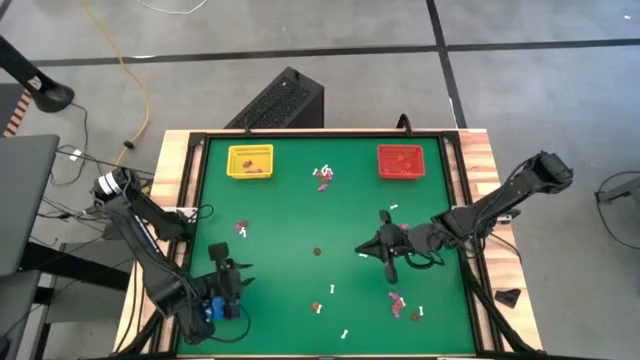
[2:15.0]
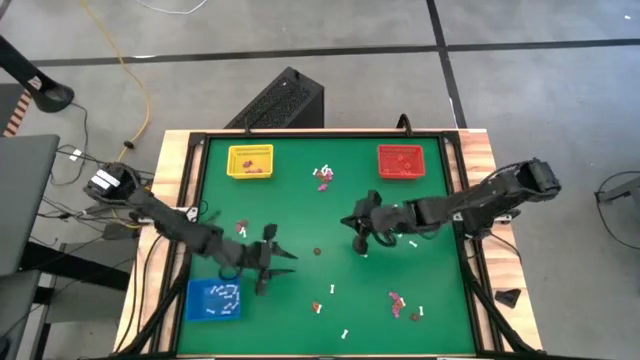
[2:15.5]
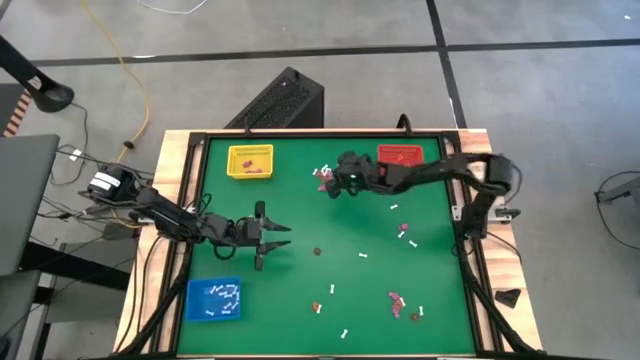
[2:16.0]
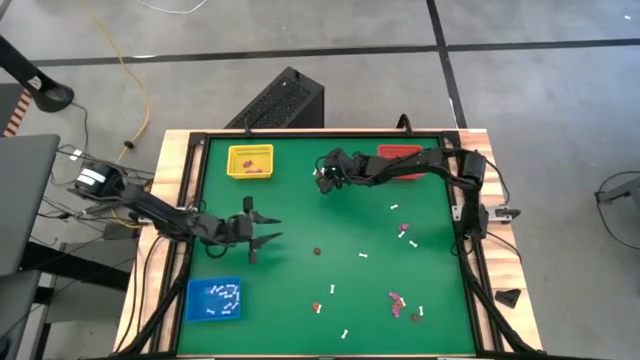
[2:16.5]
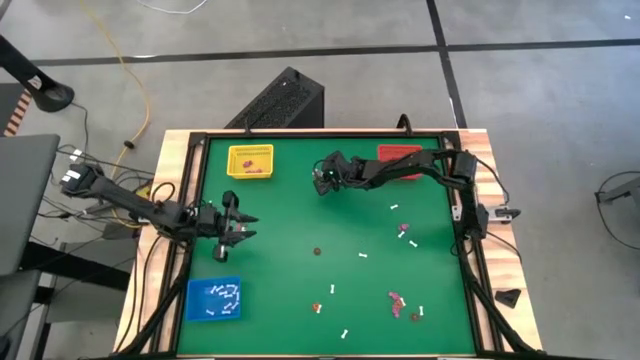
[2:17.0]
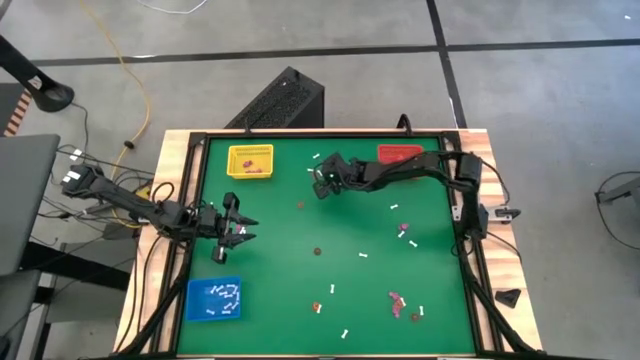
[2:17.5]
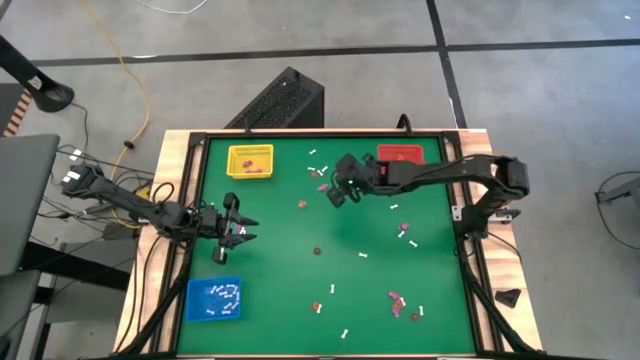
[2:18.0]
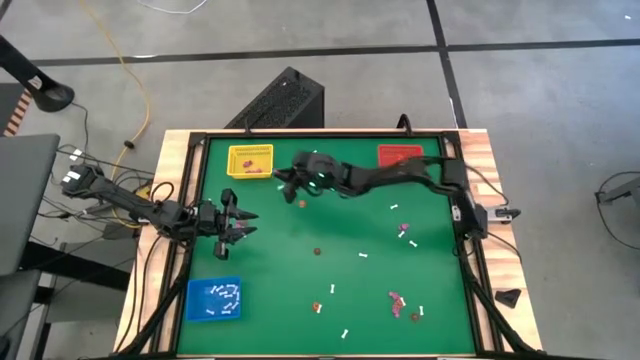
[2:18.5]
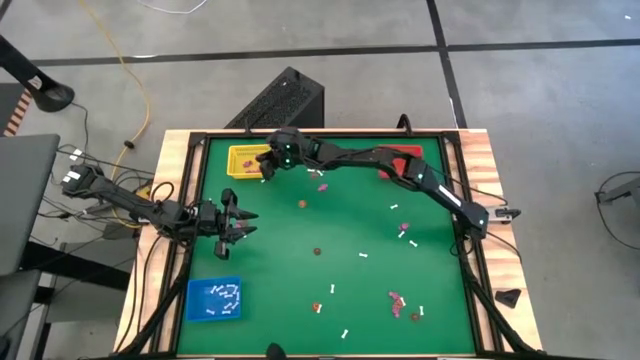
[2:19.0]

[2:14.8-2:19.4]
Task: Sort Halloween decoration
Put the pink skeleton toy into the yellow bin

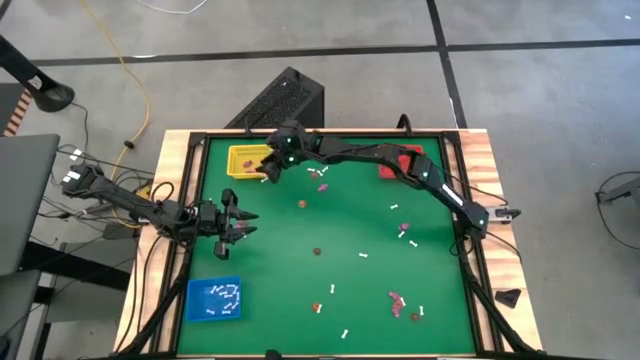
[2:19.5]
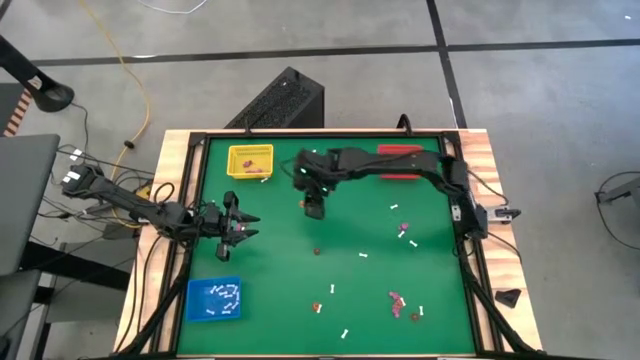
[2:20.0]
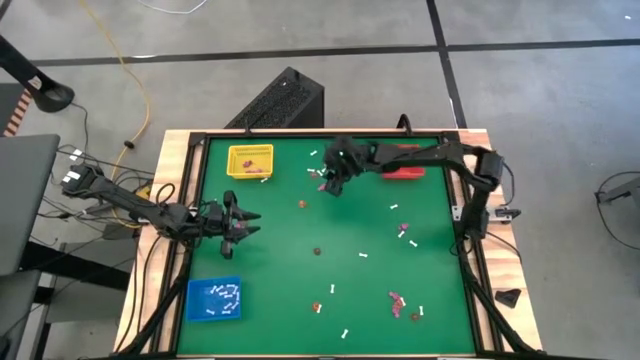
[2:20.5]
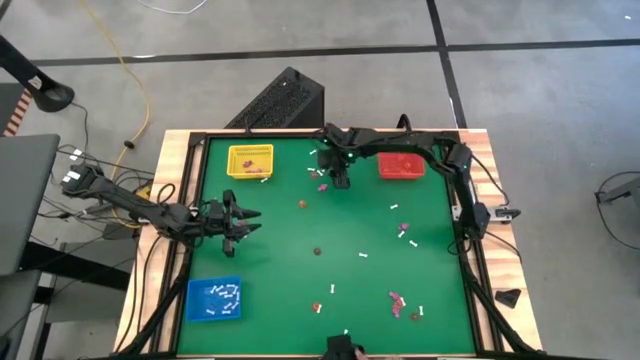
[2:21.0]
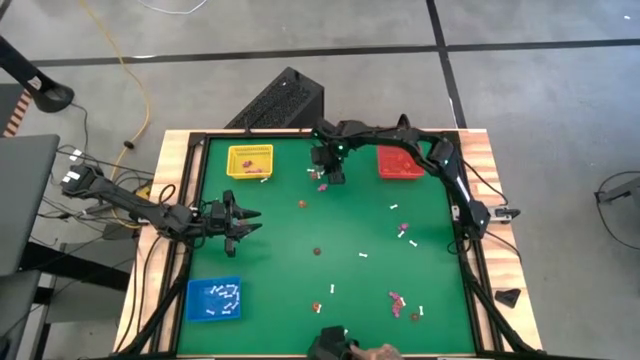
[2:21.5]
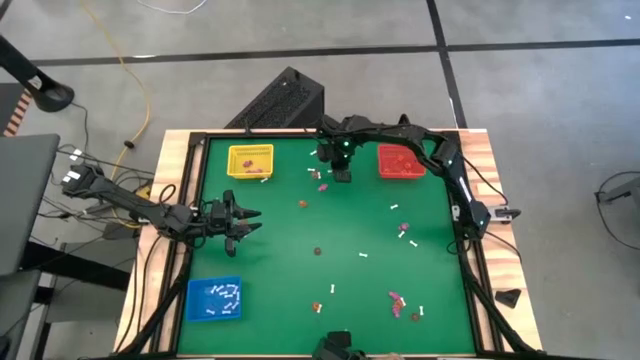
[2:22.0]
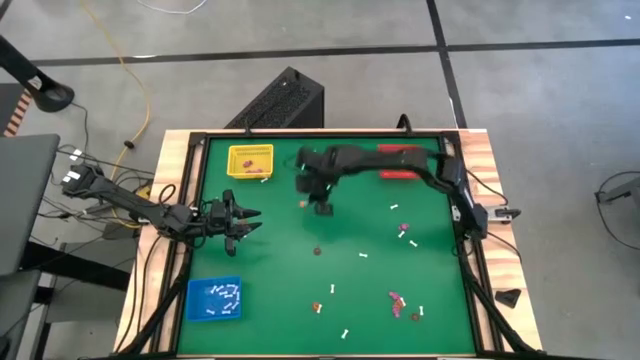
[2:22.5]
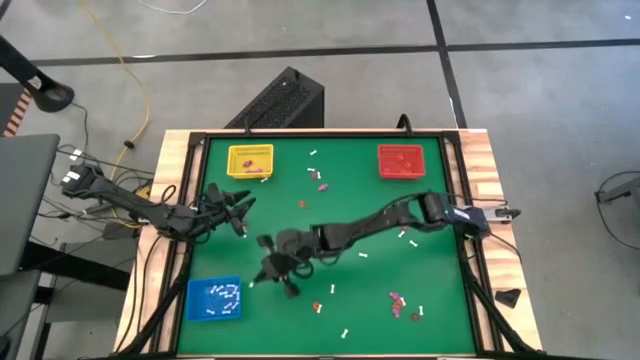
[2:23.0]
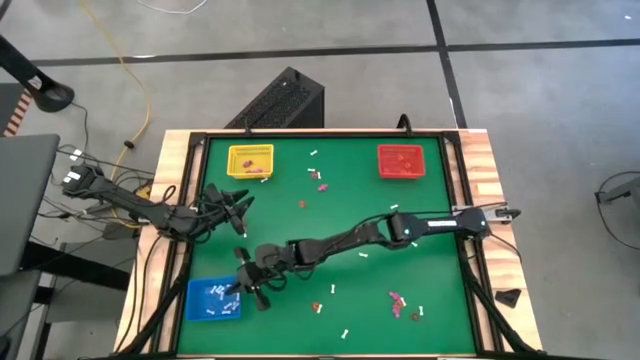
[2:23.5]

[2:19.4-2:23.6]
Put the white bone toy into the blue bin

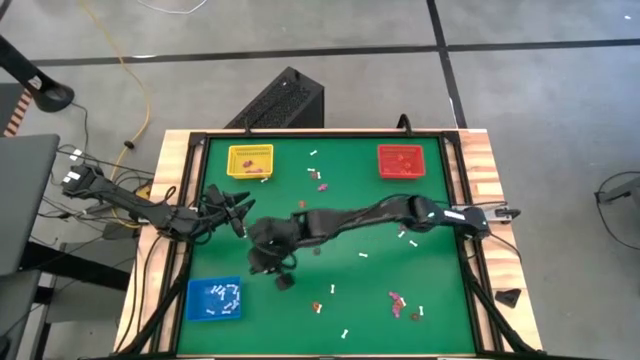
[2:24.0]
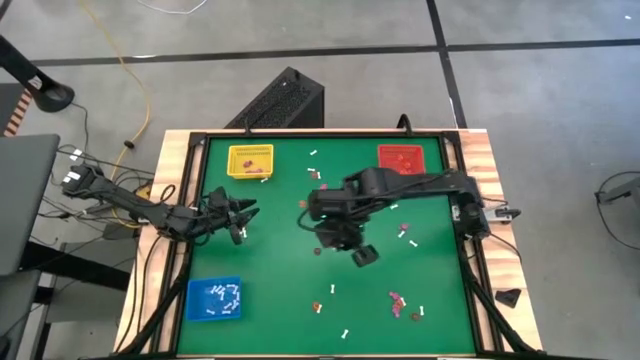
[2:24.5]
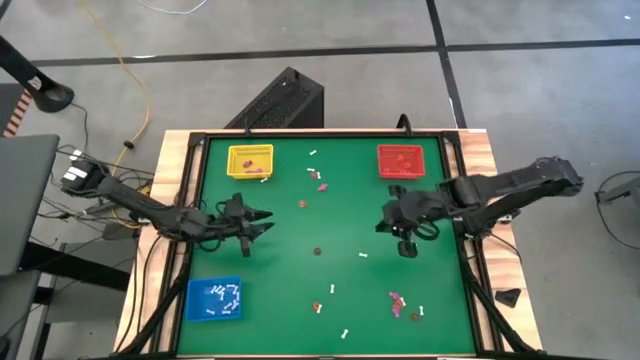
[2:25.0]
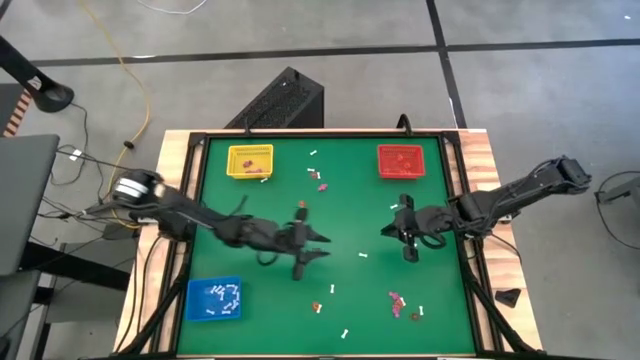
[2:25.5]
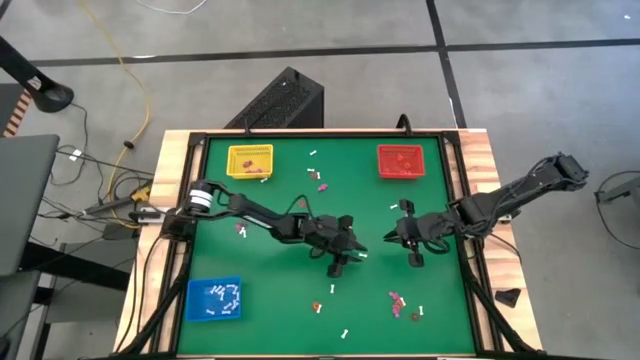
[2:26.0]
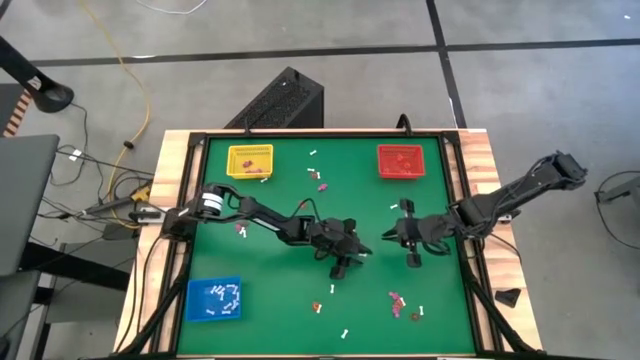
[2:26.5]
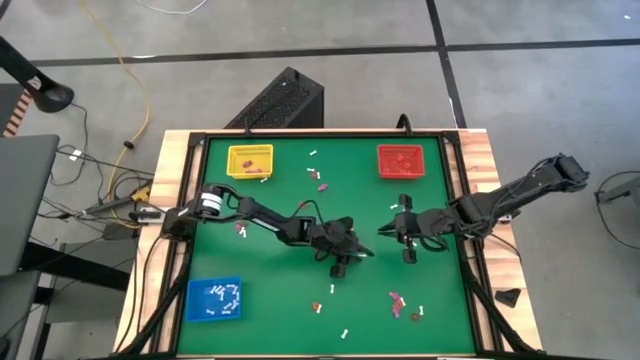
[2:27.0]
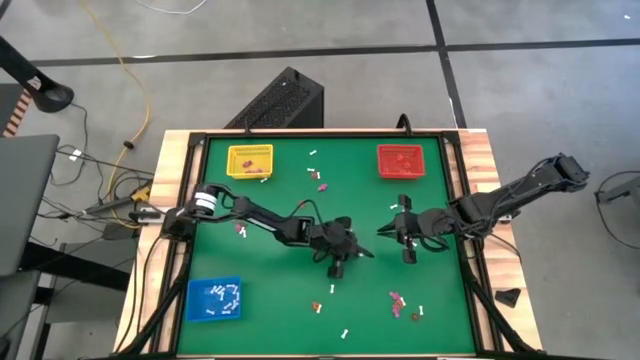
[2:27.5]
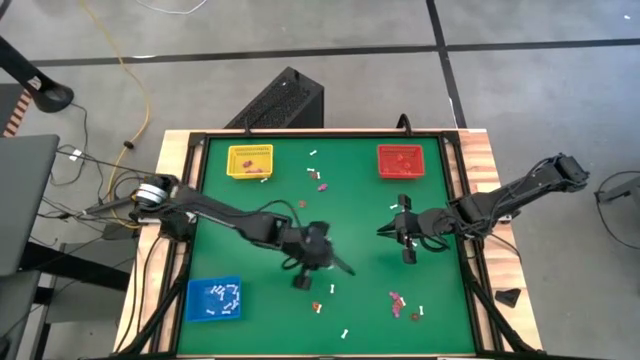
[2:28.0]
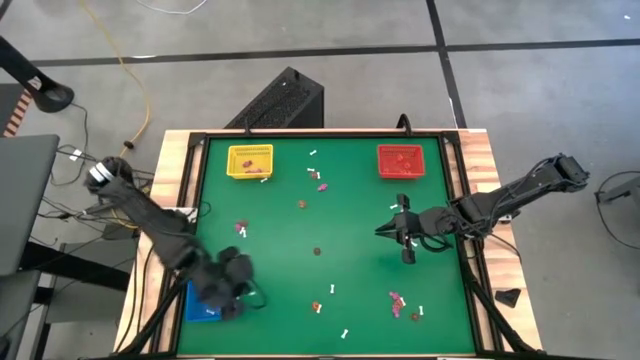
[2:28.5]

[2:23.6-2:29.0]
Put the white bone toy into the blue bin

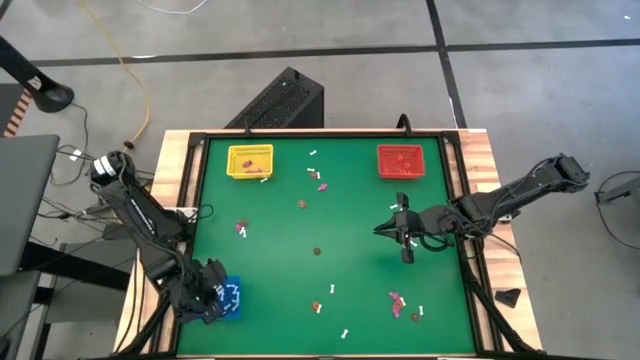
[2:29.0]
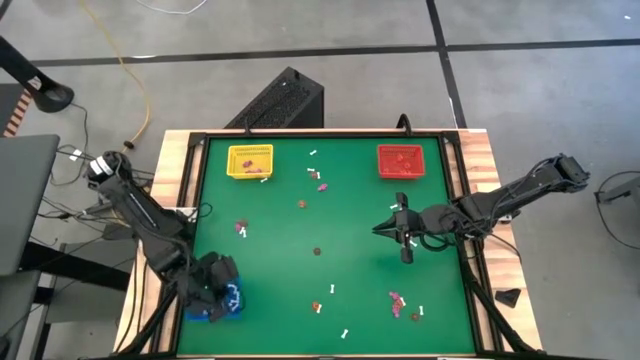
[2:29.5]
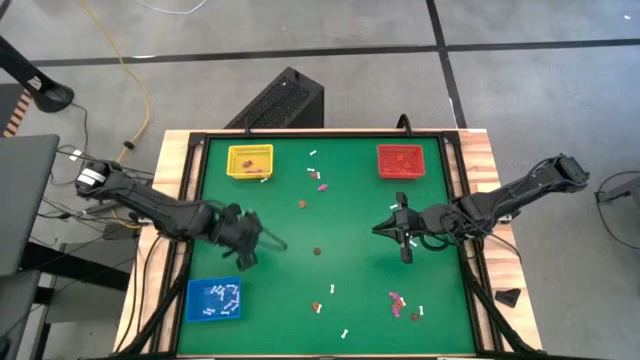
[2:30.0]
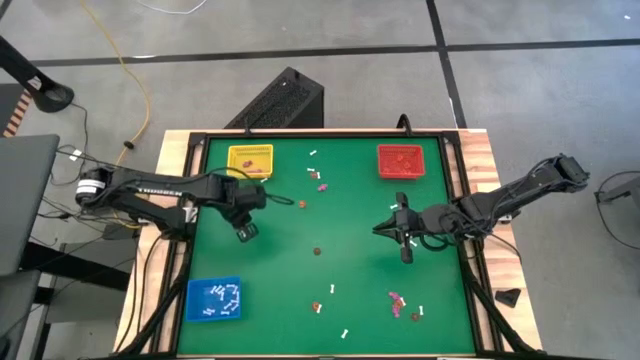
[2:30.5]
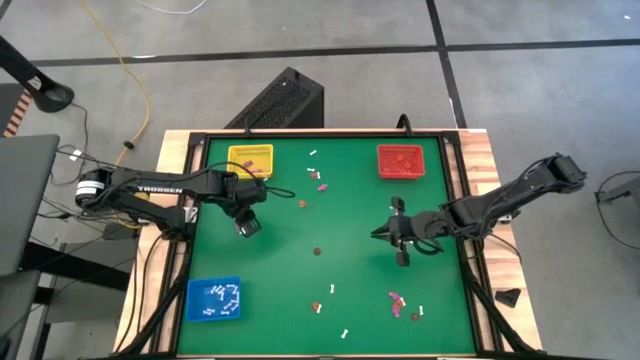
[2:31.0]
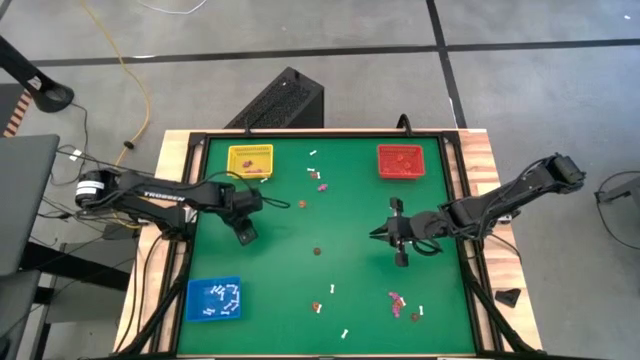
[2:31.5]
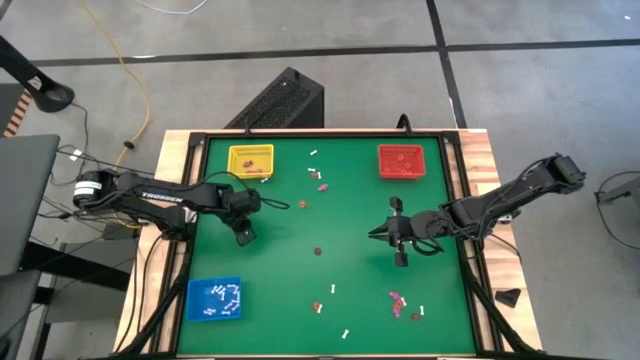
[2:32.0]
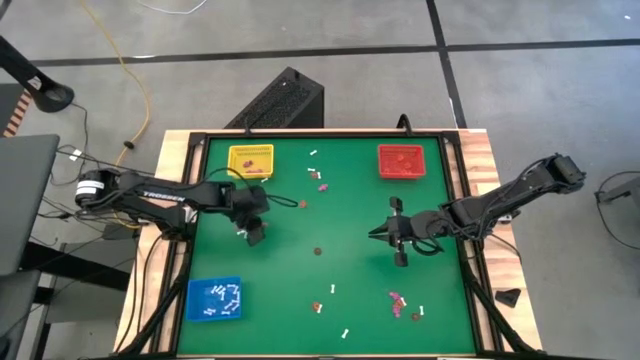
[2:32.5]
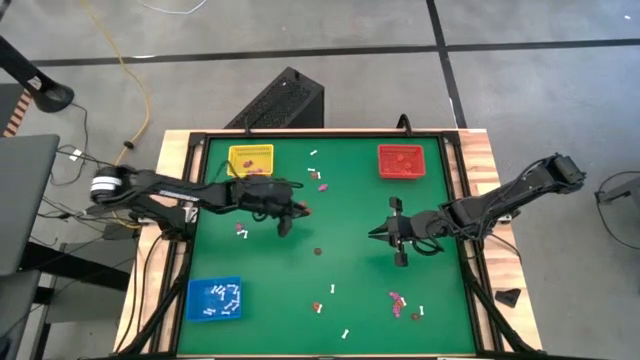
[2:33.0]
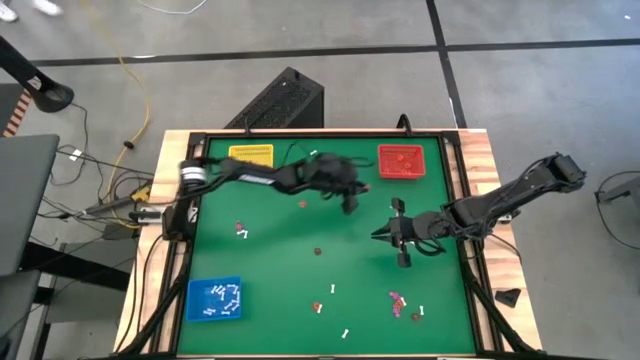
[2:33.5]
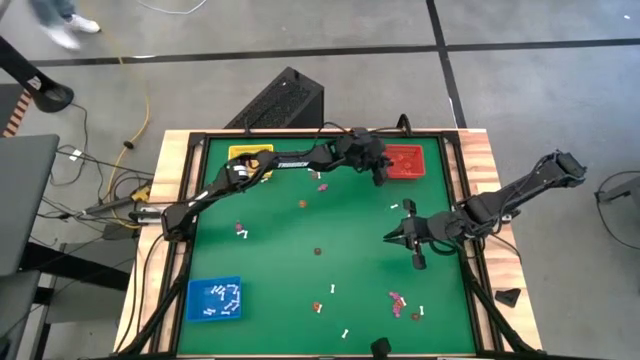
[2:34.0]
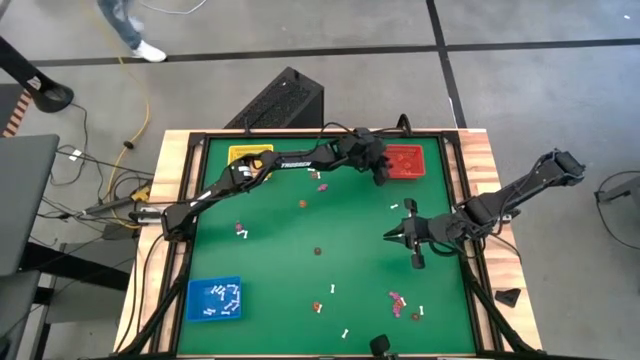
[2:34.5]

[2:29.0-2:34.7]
Put the pumpkin toy into the orange bin

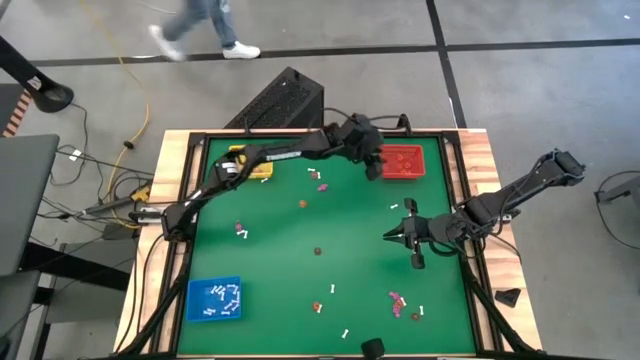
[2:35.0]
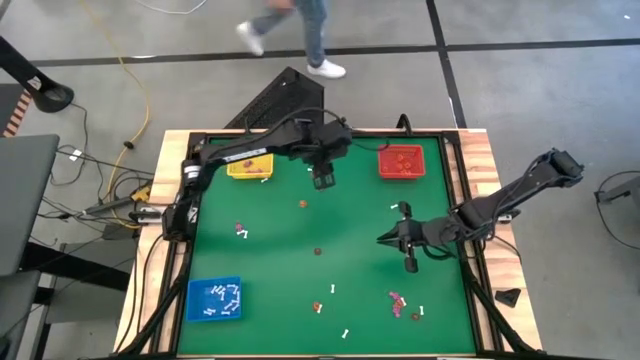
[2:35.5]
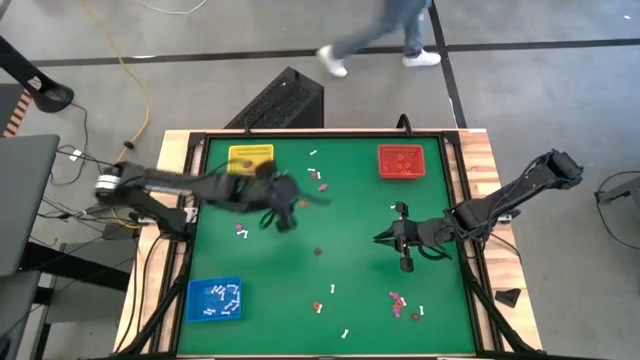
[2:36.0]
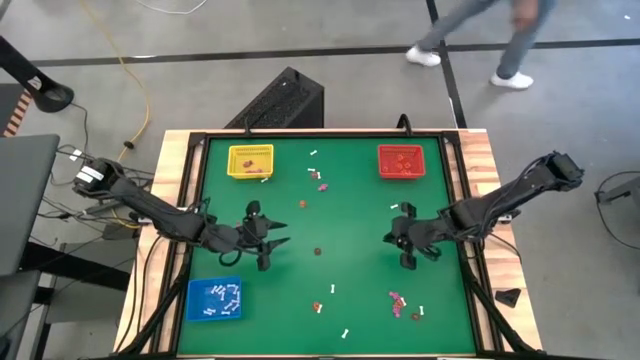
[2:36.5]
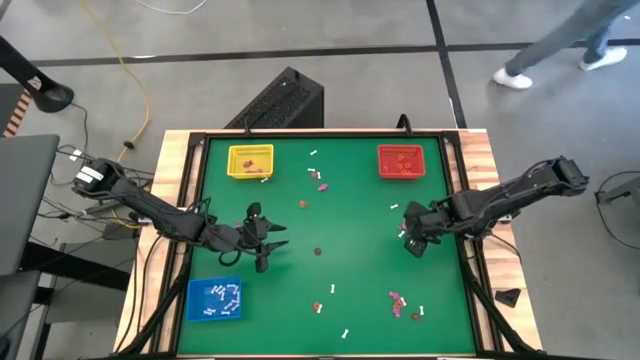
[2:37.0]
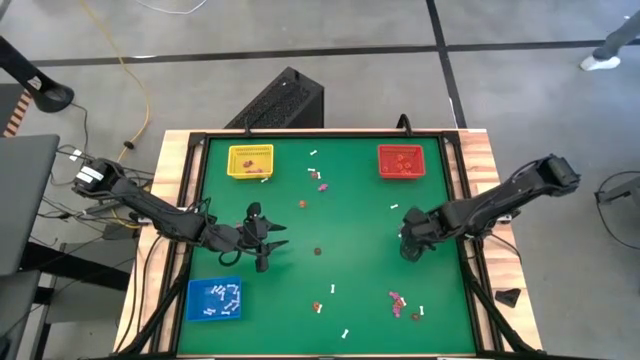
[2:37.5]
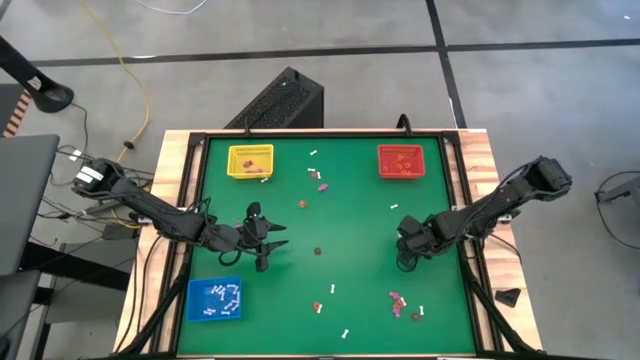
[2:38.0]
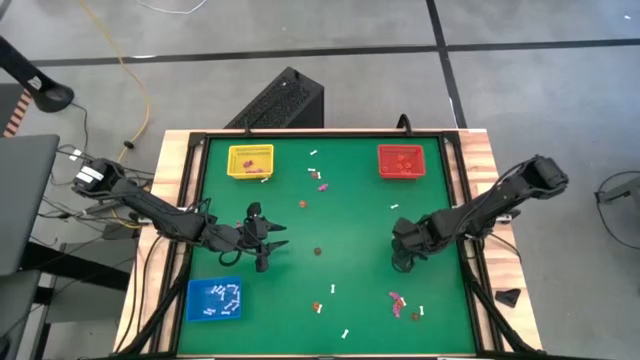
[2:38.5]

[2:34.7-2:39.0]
Put the white bone toy into the blue bin
